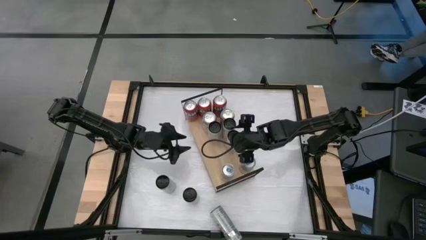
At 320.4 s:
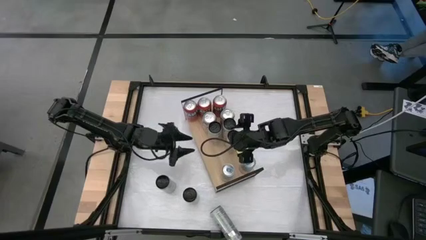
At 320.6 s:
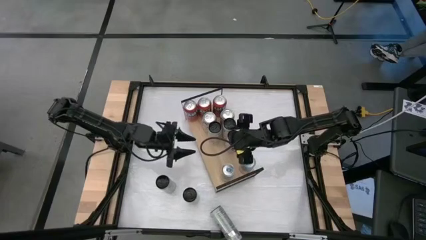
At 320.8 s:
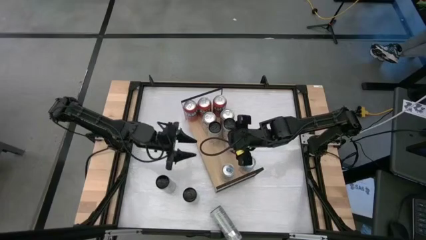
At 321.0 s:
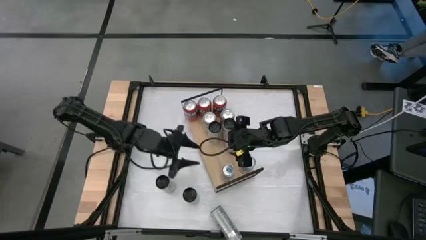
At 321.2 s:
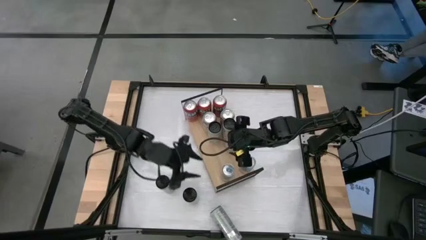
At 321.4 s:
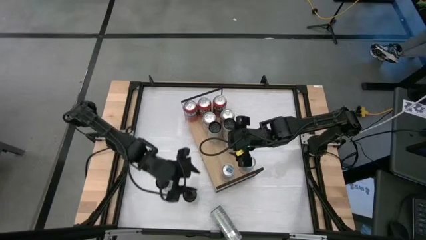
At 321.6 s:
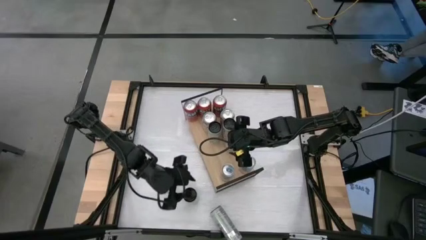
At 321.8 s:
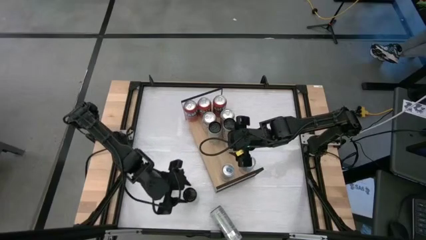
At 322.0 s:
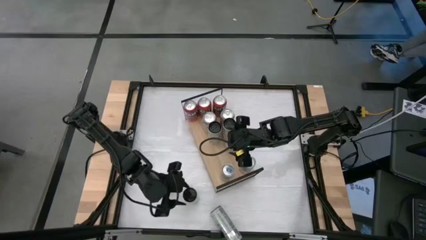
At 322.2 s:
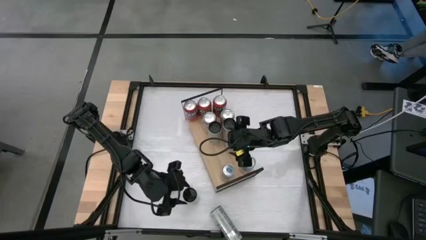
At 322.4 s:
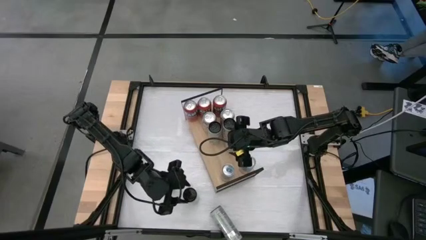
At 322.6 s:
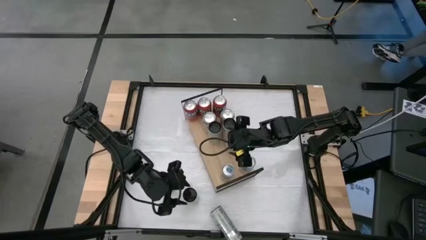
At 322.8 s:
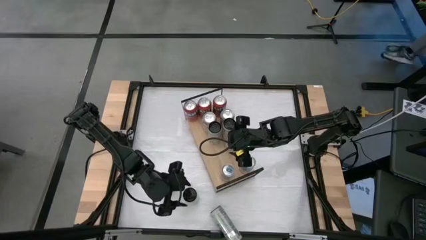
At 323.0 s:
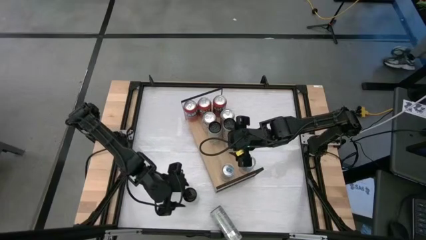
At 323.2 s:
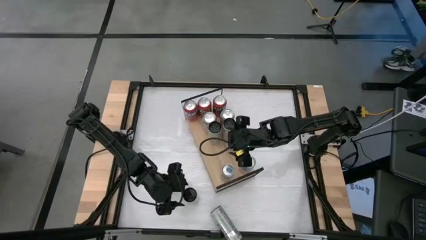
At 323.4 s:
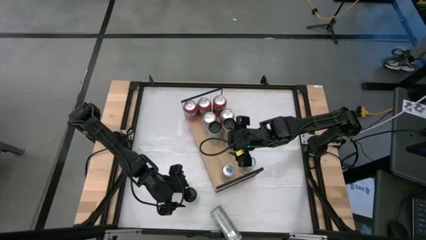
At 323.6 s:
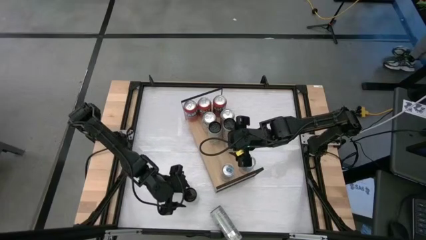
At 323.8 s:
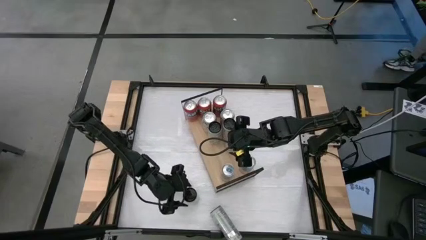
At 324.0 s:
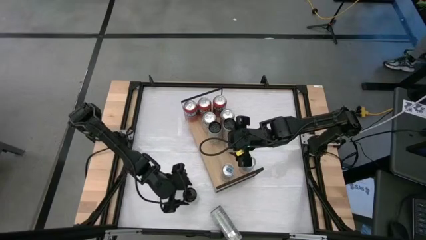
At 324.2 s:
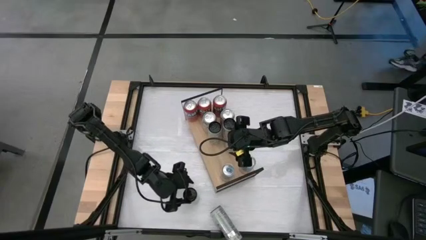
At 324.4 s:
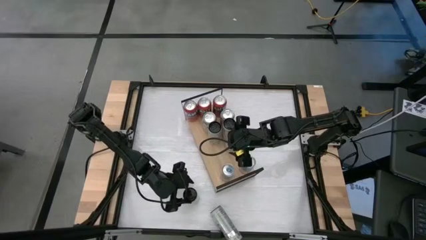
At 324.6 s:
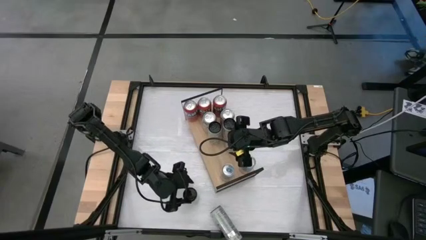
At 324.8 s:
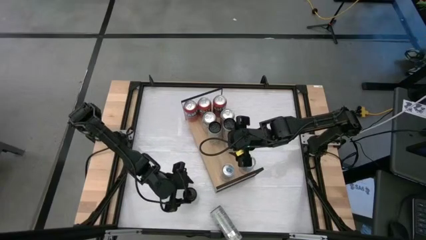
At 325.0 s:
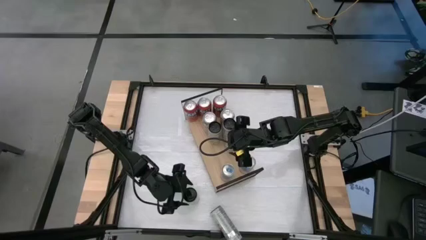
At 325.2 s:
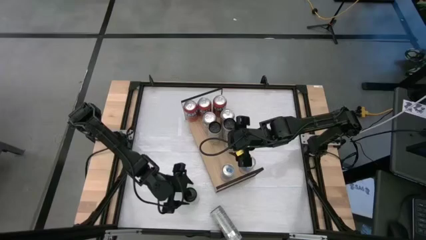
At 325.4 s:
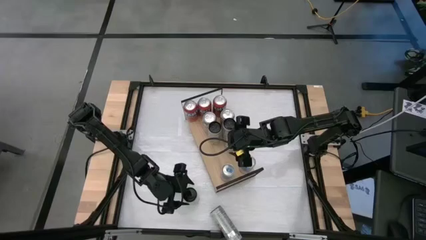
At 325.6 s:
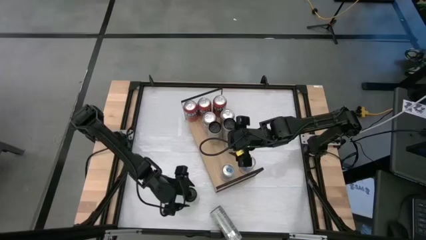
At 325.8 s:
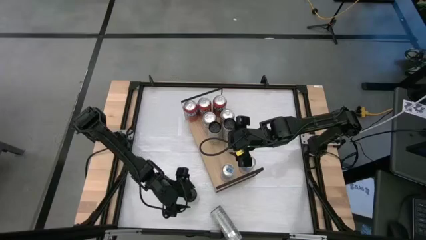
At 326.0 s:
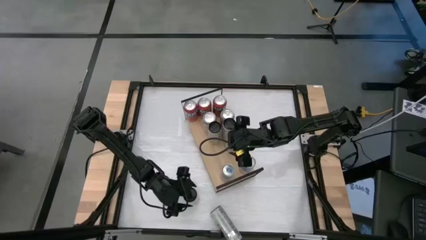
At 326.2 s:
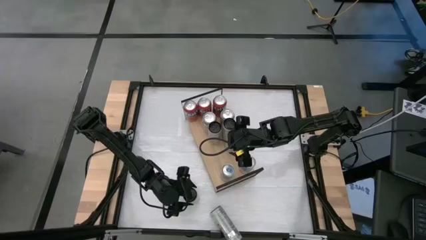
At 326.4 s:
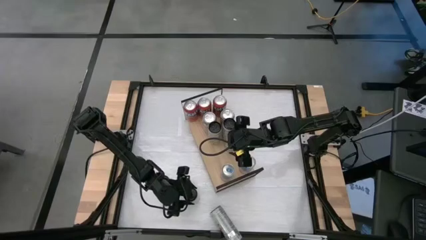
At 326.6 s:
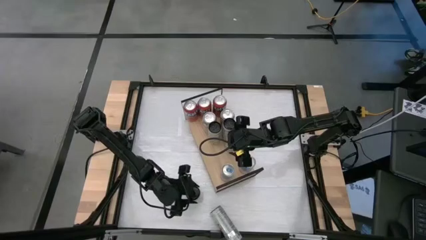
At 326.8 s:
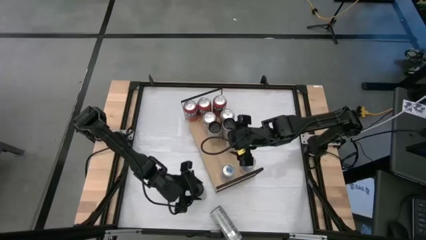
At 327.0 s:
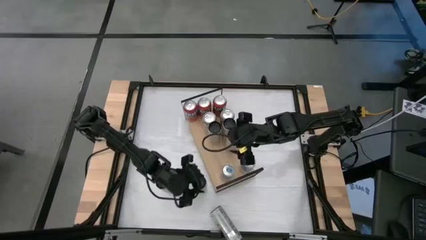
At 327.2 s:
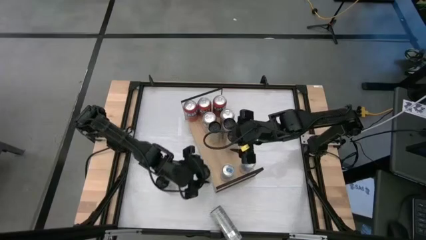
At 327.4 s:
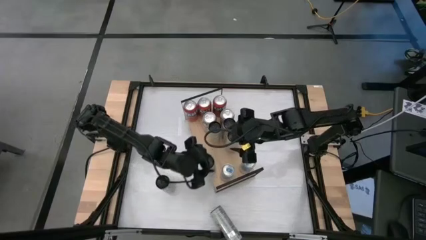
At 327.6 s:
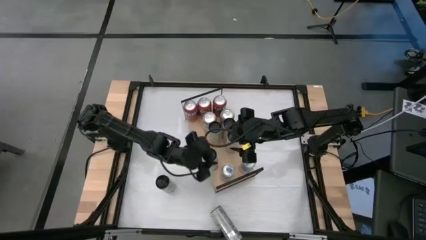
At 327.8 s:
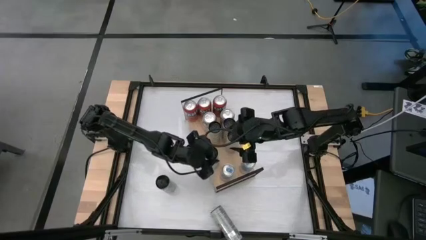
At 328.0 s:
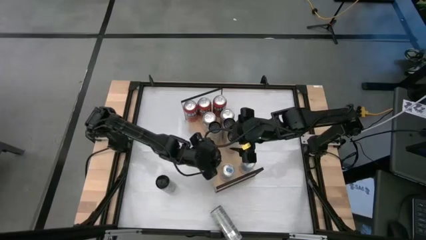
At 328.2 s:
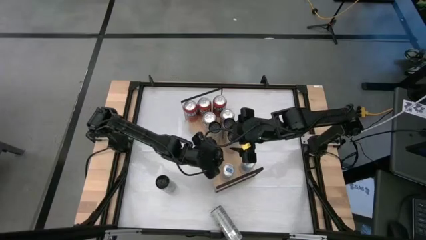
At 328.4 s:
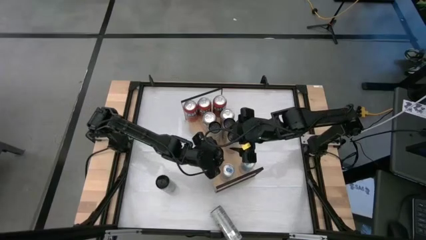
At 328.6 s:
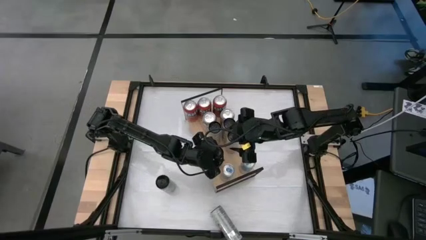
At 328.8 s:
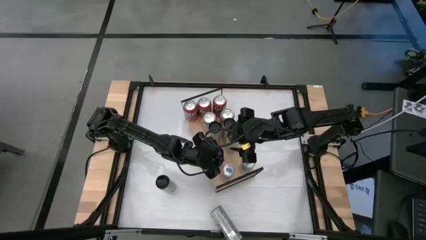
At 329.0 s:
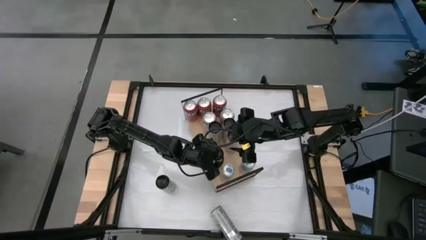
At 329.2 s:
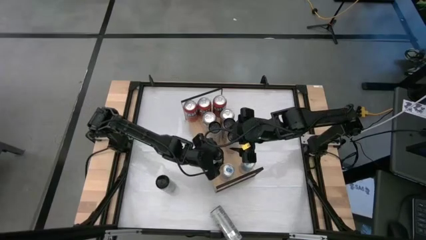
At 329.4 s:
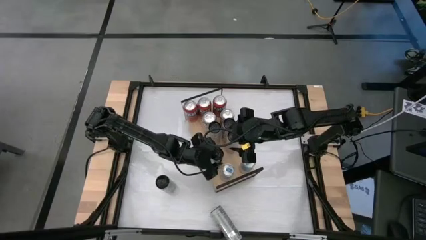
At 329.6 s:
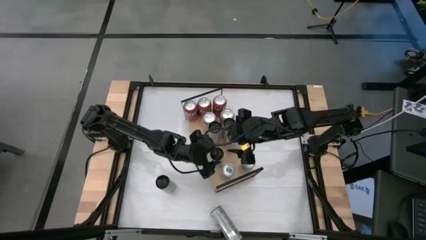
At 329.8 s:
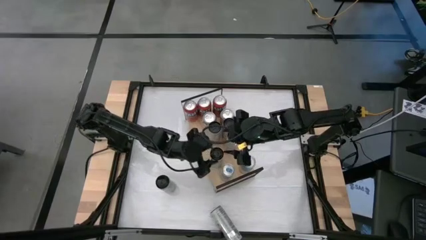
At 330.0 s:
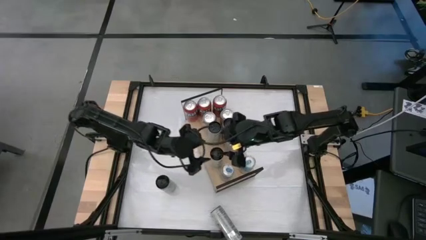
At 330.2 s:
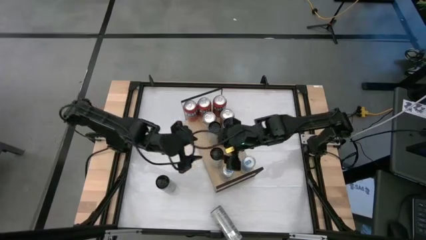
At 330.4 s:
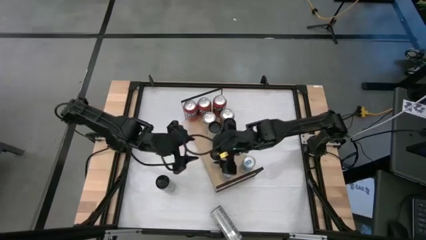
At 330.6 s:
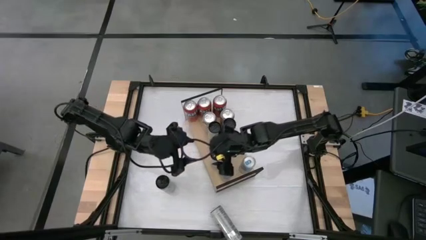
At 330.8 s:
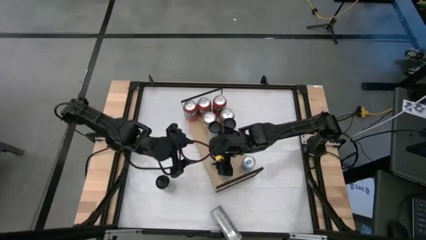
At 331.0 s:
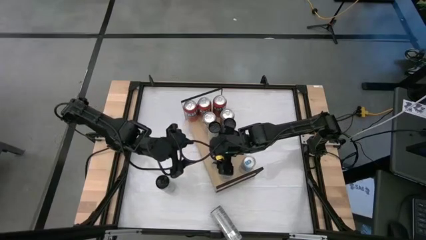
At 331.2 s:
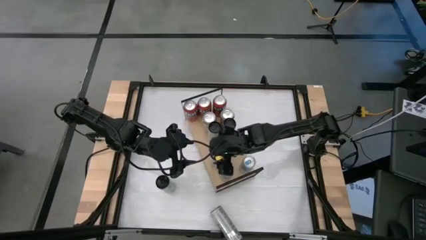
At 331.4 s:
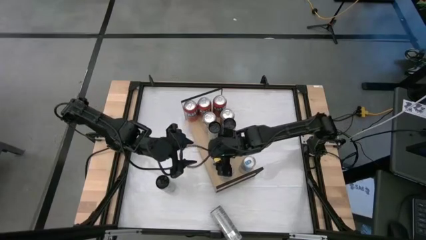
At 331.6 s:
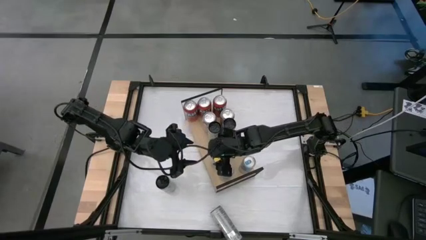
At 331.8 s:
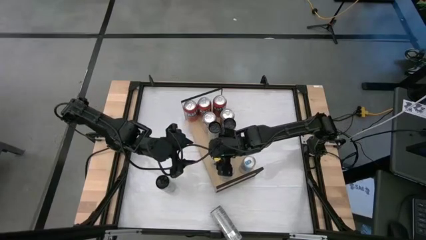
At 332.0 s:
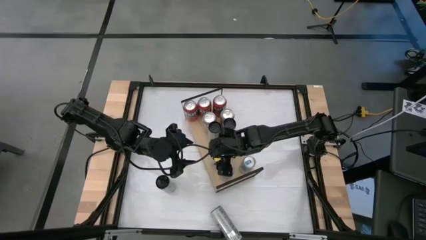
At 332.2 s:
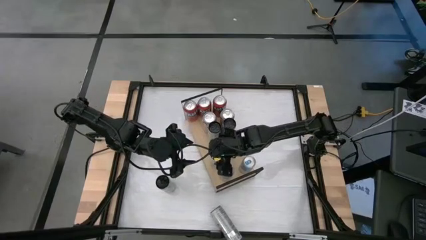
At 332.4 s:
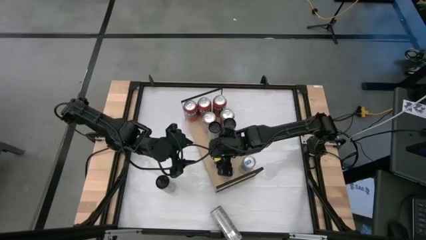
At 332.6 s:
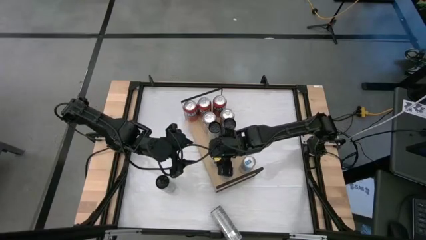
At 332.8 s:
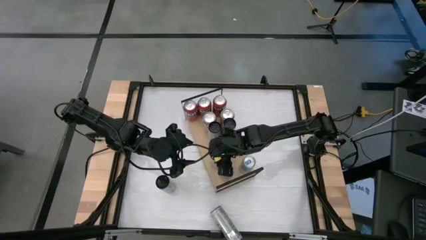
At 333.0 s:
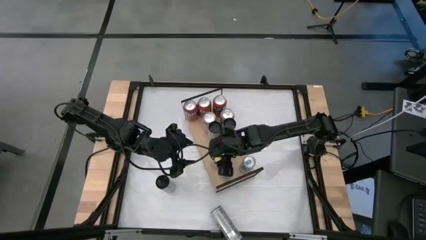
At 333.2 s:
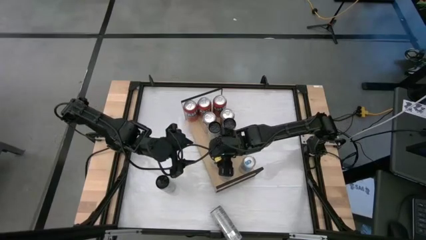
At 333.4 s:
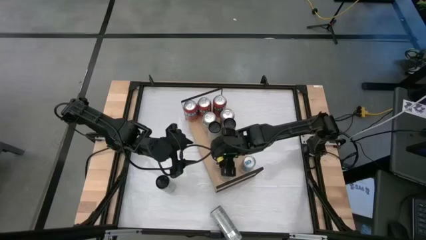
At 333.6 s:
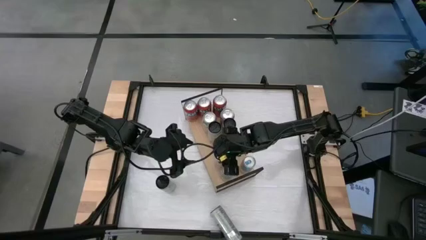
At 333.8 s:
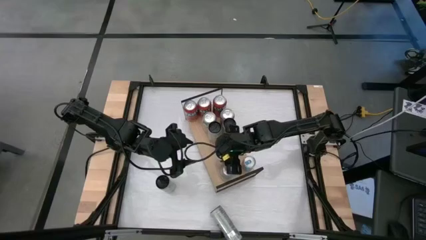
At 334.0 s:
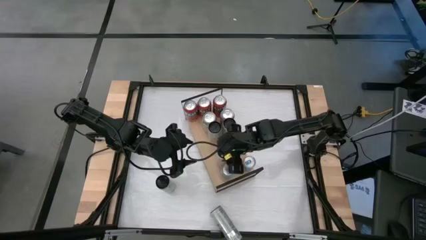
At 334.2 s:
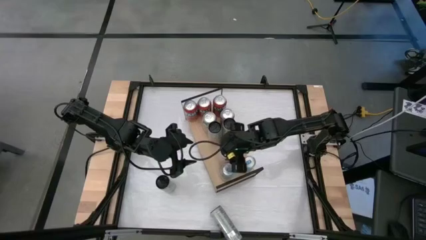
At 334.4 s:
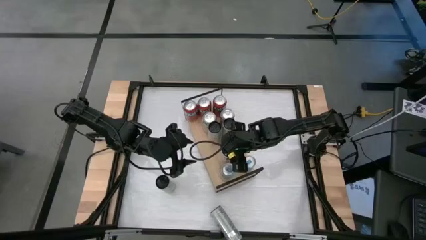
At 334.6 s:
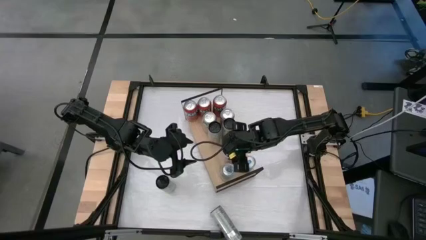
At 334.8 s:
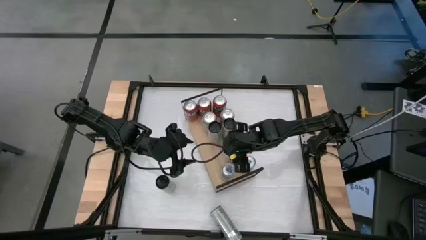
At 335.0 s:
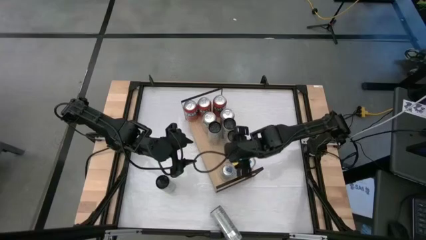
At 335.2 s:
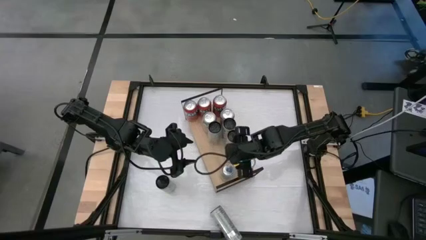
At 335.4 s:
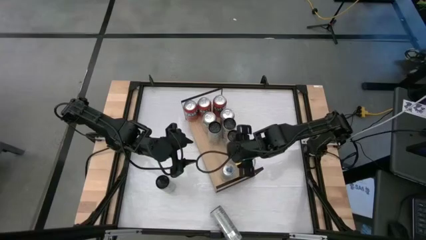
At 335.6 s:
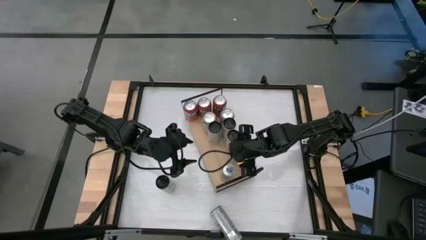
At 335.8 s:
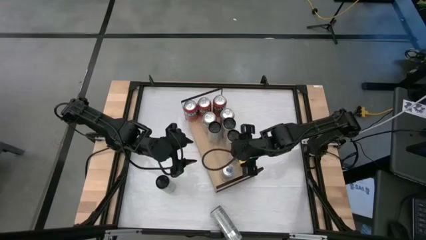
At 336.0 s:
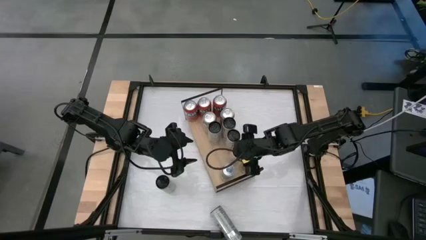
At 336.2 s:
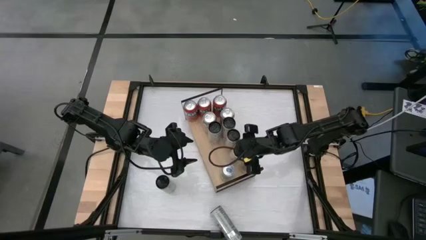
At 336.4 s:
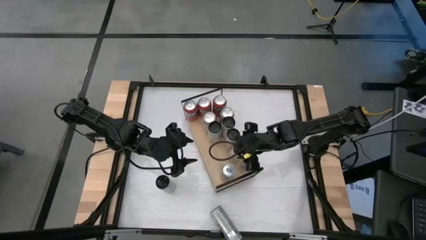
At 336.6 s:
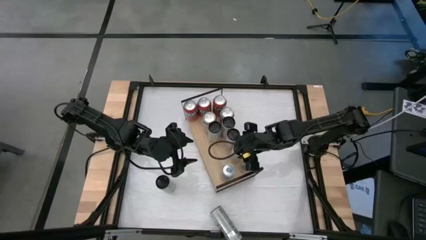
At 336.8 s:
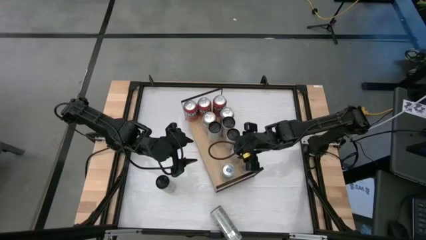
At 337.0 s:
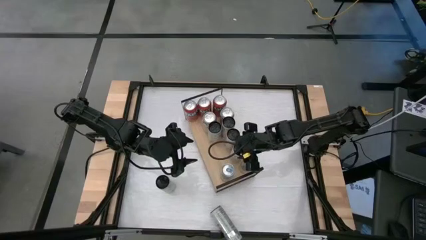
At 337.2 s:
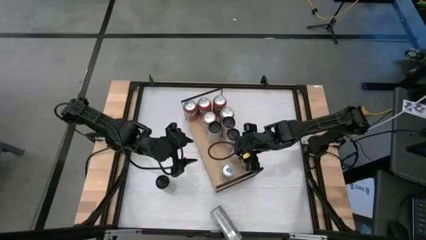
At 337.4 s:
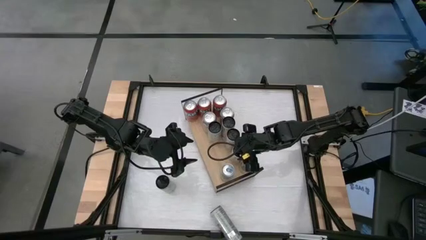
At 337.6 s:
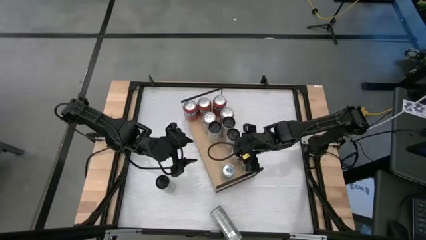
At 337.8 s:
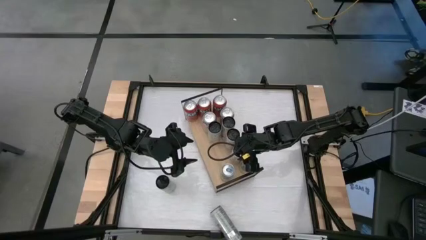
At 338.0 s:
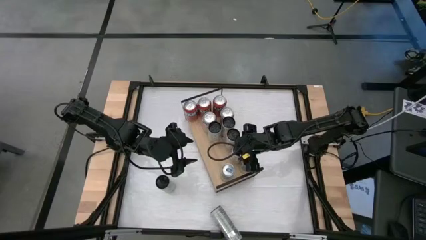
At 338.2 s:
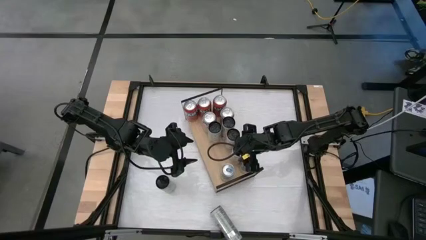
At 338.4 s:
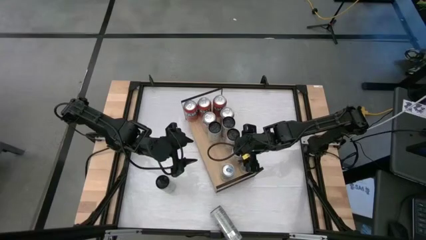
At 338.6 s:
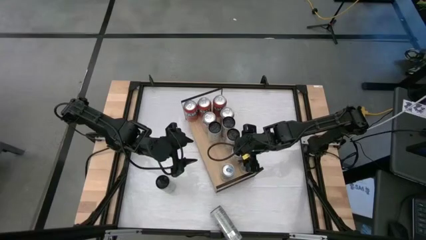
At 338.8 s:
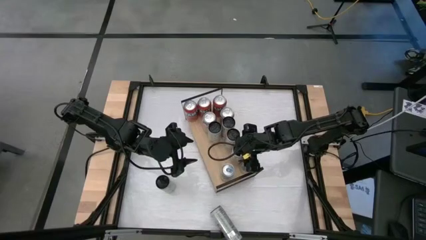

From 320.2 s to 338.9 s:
Task: Place canned beverage on shelf
Put the right red soda can on the shelf
